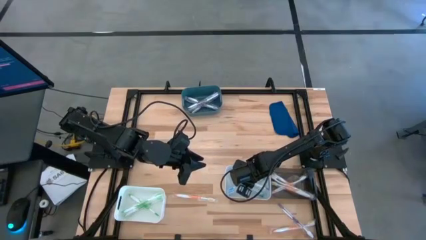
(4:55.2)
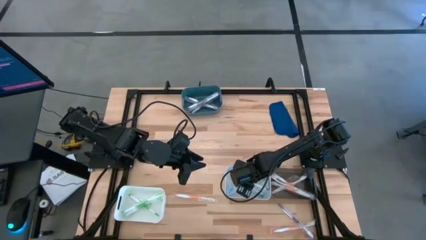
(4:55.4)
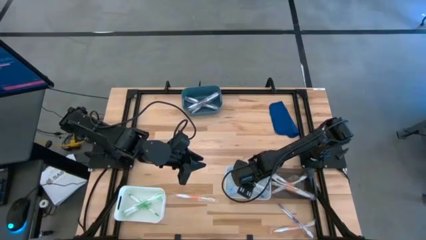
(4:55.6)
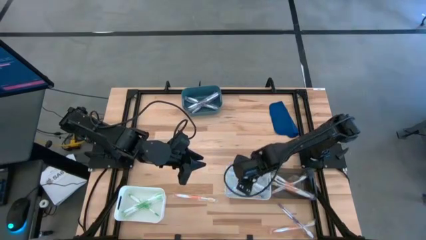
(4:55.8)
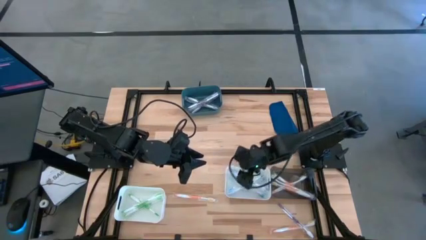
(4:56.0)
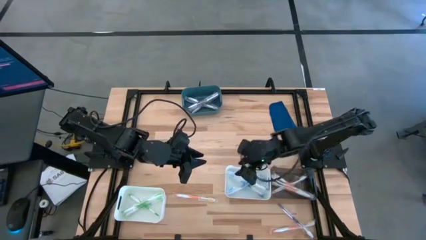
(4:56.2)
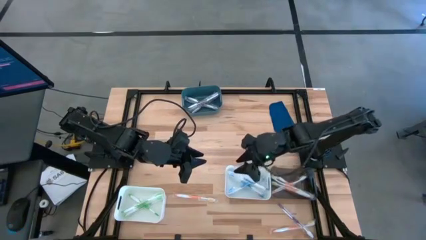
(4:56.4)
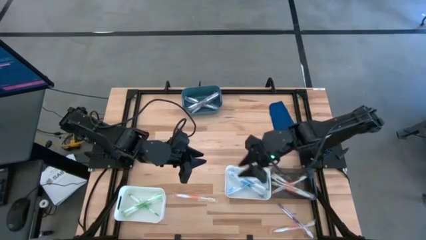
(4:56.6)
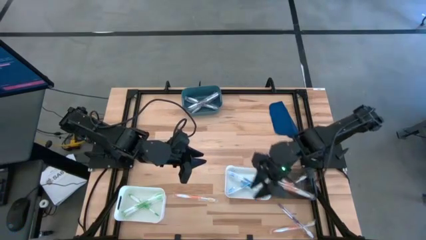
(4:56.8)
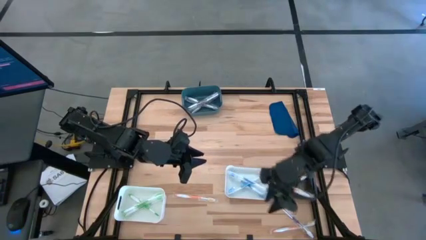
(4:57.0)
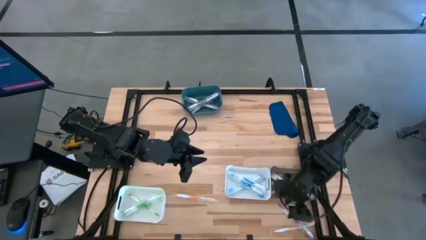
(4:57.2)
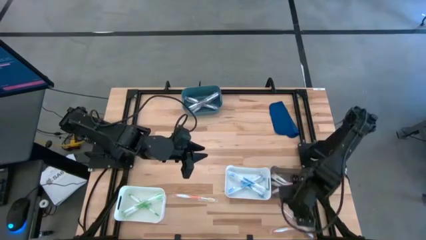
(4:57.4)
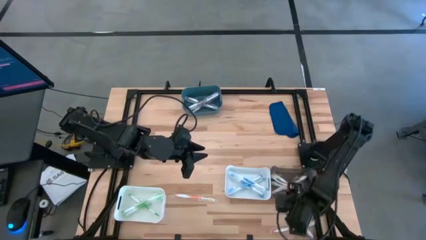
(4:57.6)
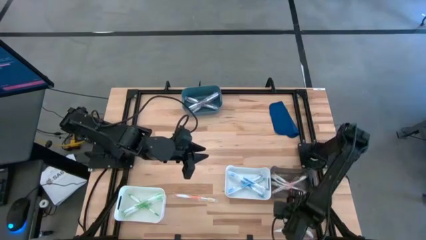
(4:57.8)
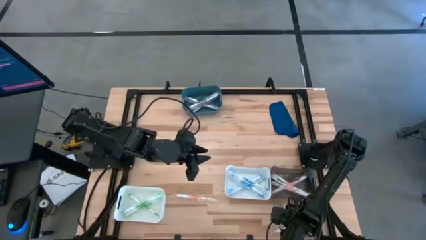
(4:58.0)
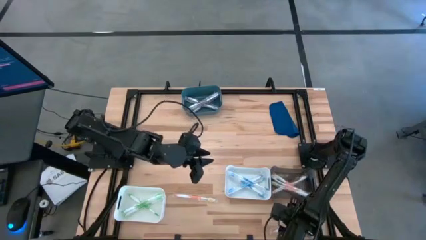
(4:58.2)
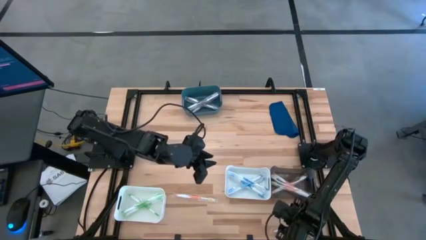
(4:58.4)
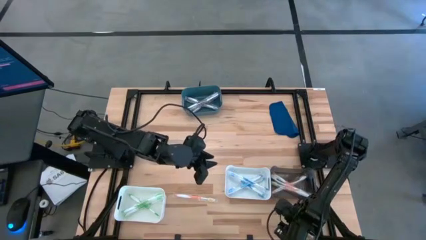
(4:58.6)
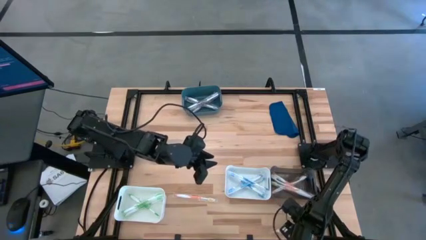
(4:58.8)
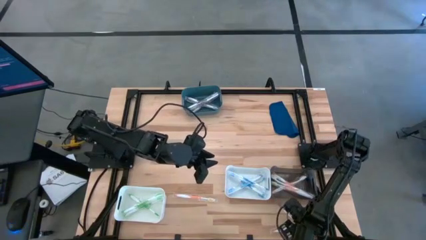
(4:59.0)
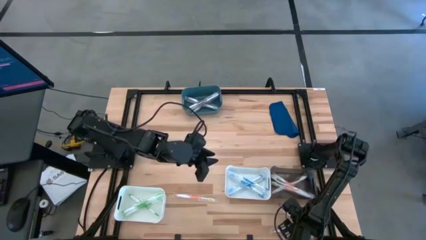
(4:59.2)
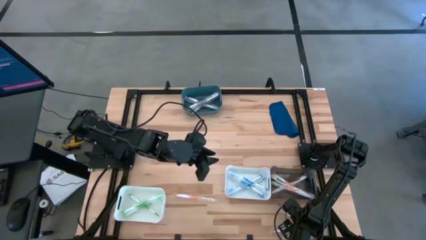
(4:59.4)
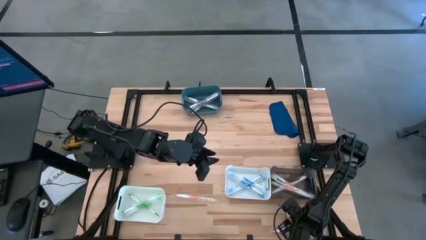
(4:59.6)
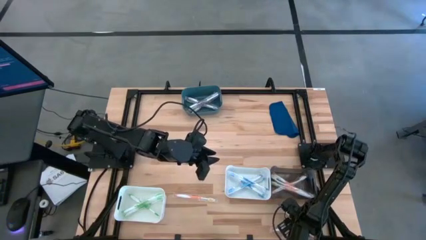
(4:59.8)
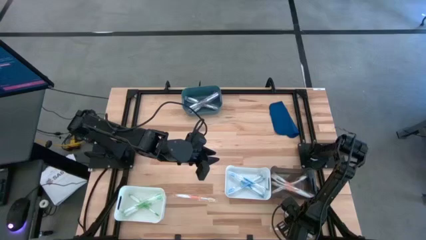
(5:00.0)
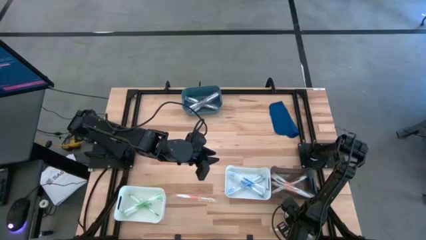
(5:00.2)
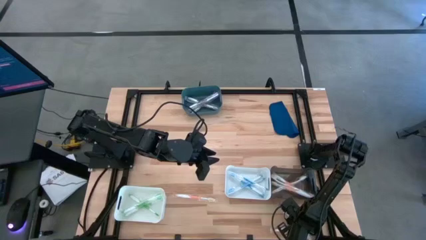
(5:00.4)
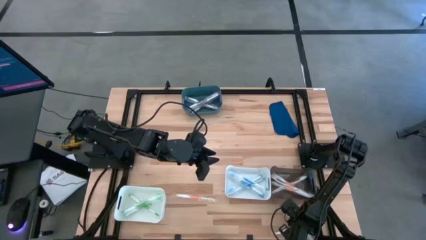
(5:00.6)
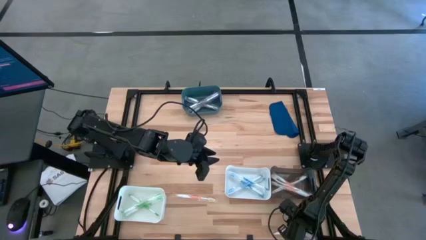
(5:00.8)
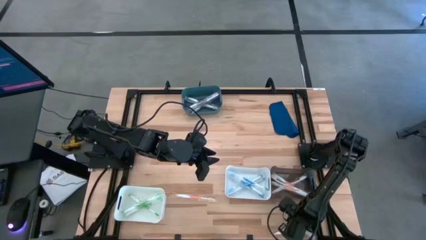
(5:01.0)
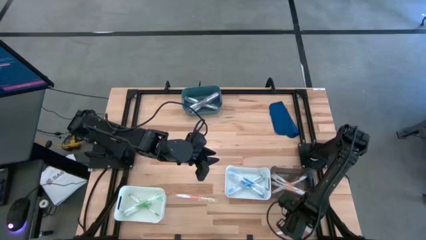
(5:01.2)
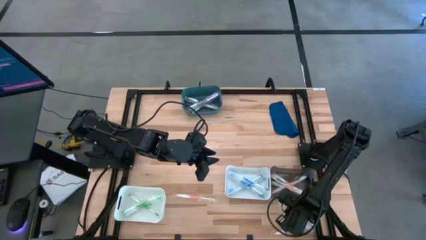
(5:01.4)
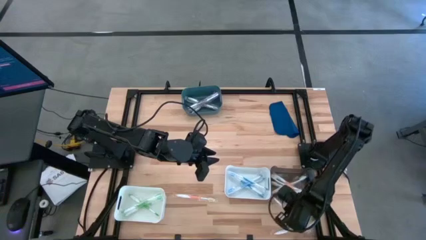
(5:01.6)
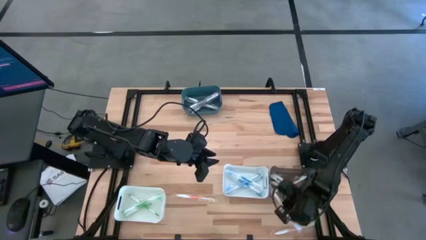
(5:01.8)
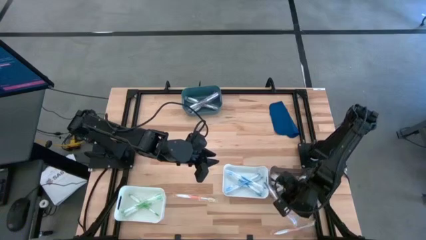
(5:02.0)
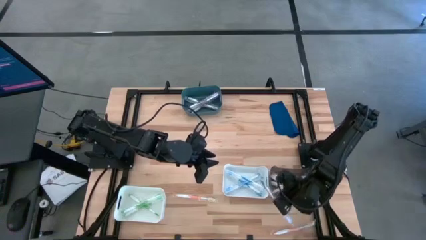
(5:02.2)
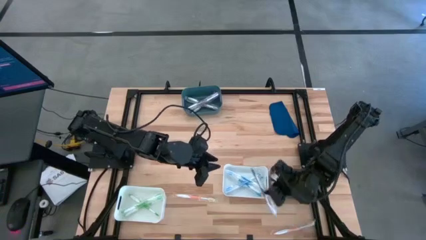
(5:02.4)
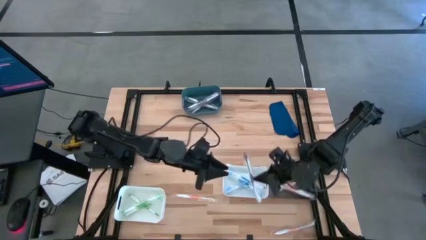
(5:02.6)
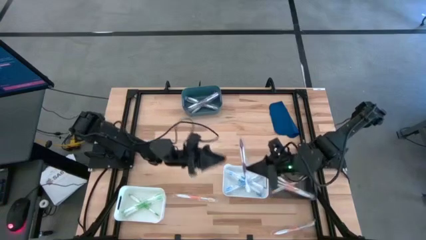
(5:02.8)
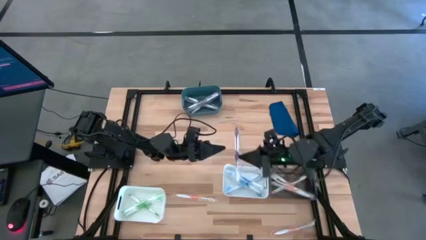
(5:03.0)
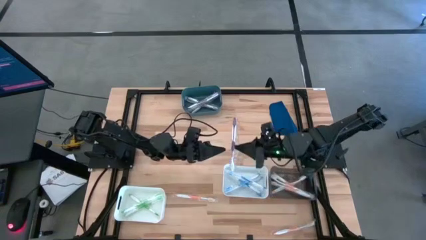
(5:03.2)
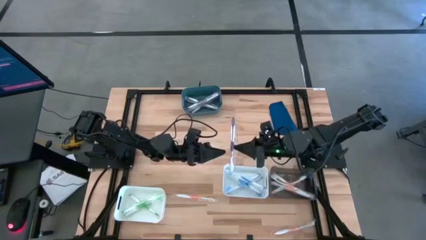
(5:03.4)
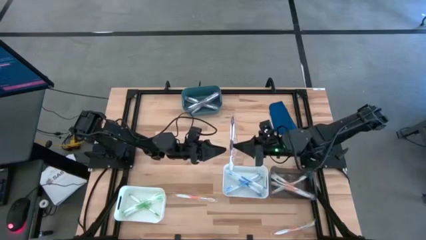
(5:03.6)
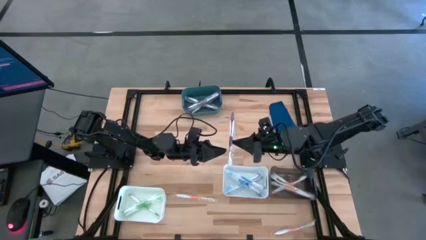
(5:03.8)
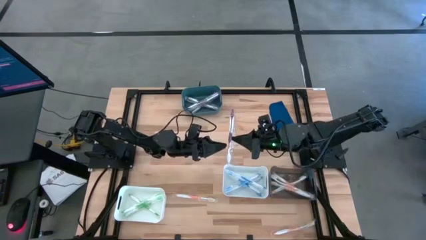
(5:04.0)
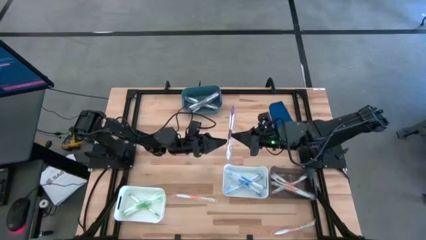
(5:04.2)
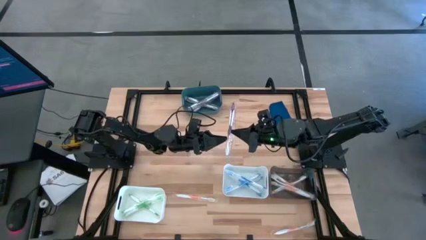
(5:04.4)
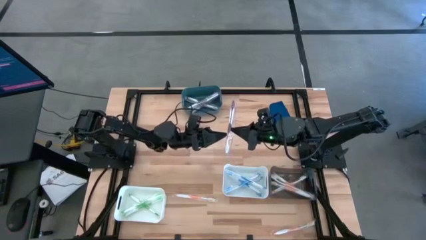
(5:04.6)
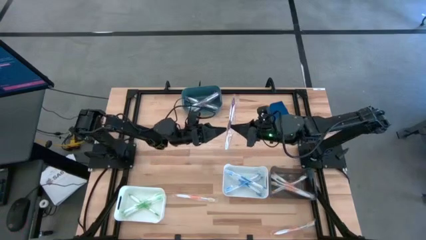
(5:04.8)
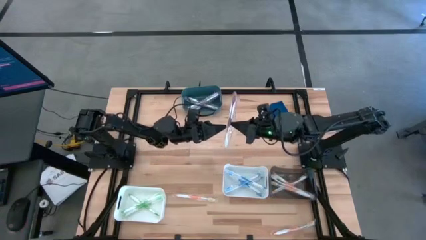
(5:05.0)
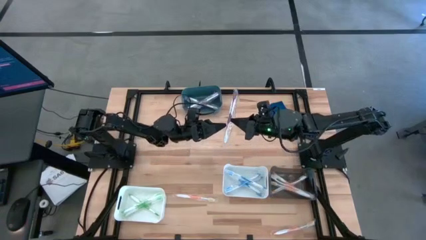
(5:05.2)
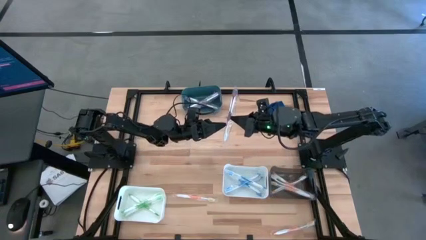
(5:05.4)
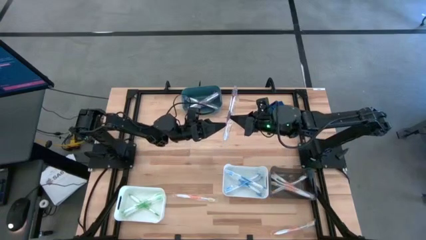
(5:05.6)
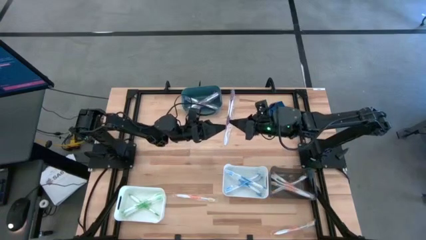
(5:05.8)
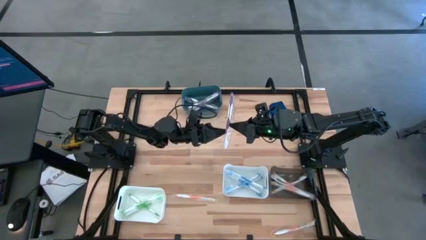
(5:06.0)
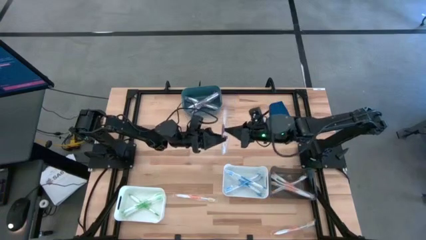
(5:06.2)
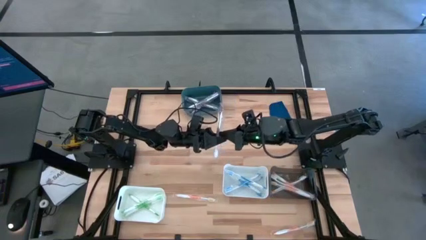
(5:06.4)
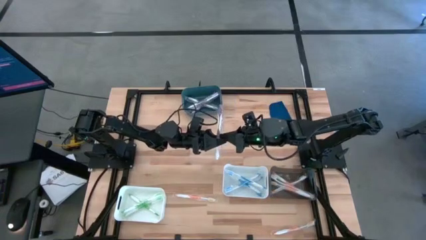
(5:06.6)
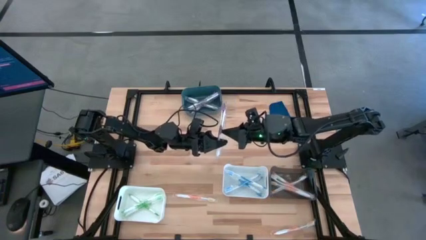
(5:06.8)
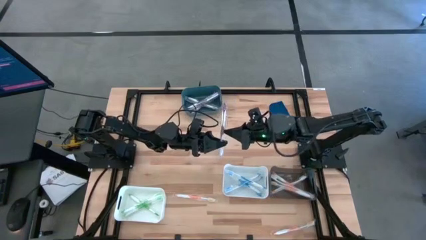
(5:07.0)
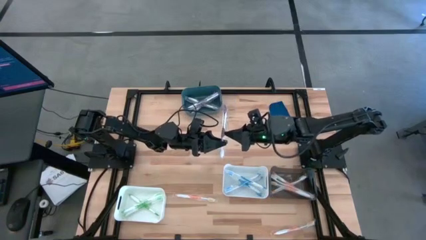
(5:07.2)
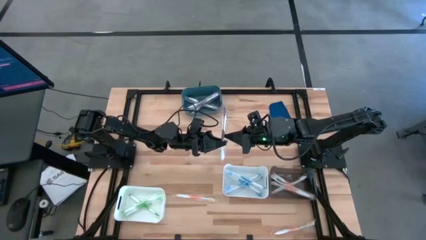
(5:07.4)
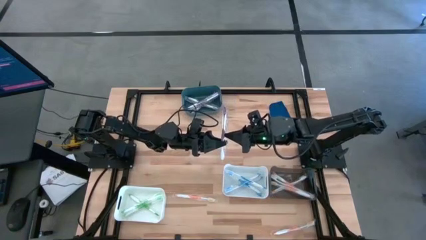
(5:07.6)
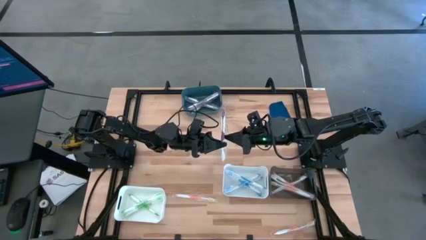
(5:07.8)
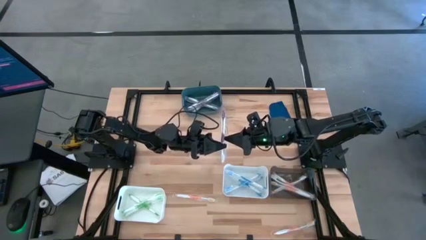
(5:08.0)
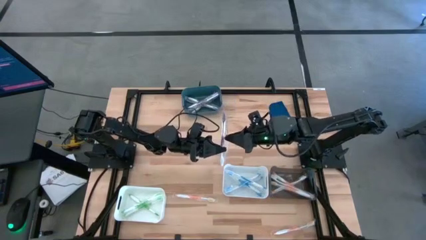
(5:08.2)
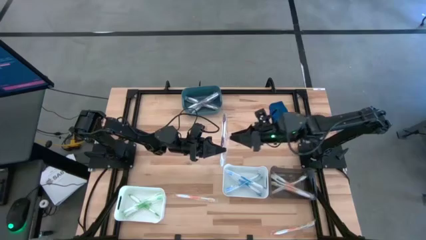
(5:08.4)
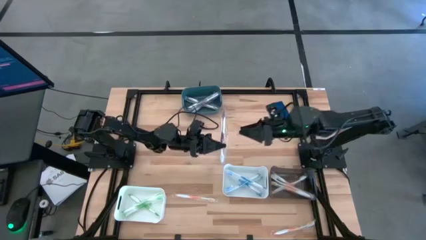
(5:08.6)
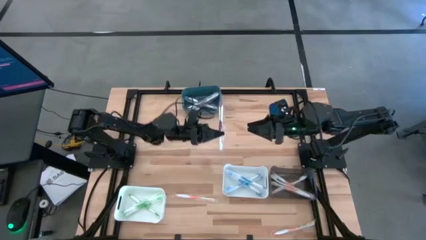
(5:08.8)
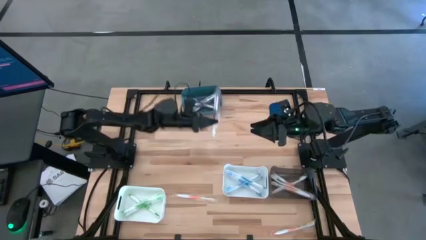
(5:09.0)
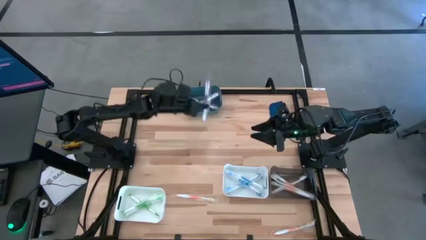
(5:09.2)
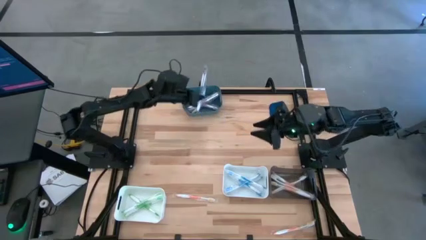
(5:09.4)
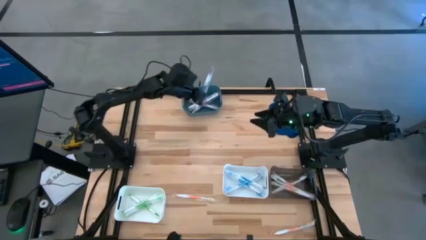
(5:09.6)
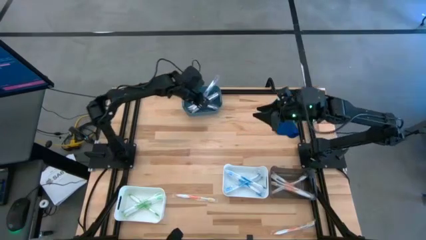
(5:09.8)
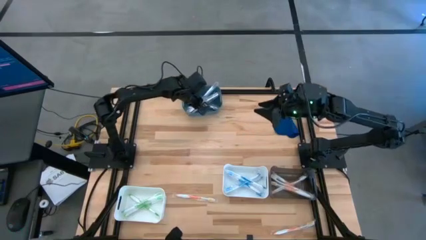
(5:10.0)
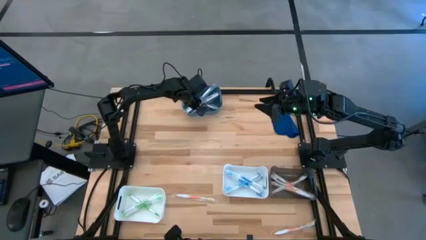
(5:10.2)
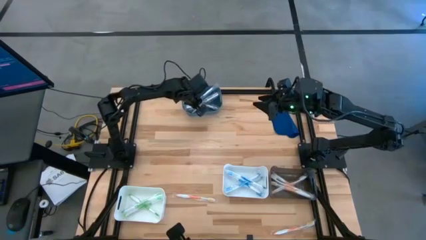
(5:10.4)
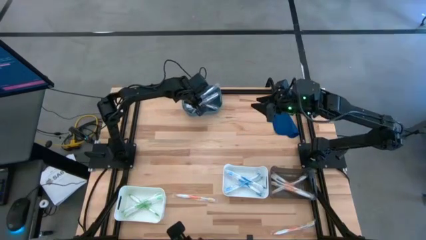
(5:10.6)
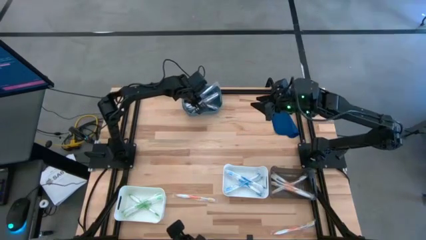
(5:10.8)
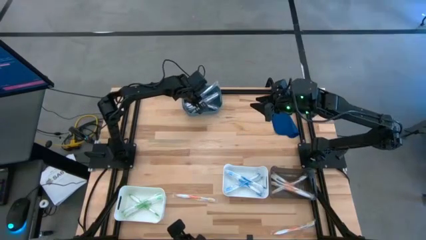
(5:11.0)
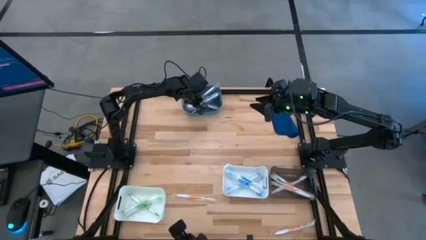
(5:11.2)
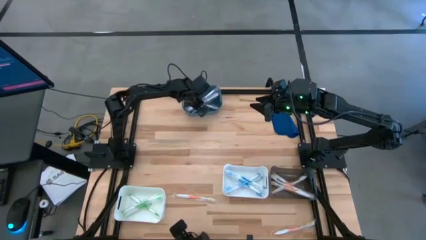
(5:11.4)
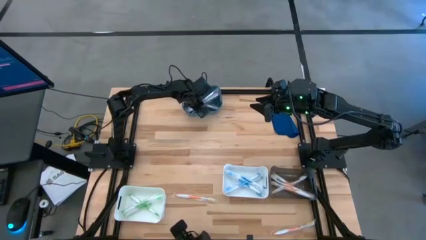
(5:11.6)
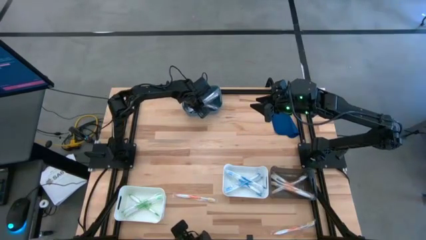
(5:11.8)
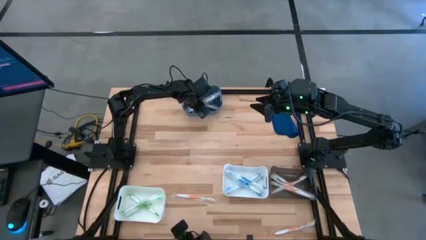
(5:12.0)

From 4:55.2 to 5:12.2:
Task: Pick & Place Toothbrushes
Put the violet toothbrush into the blue bin
